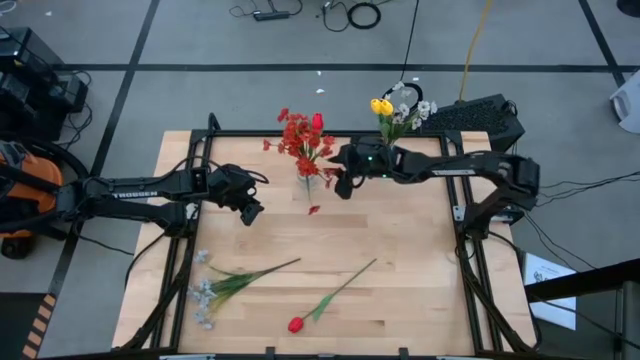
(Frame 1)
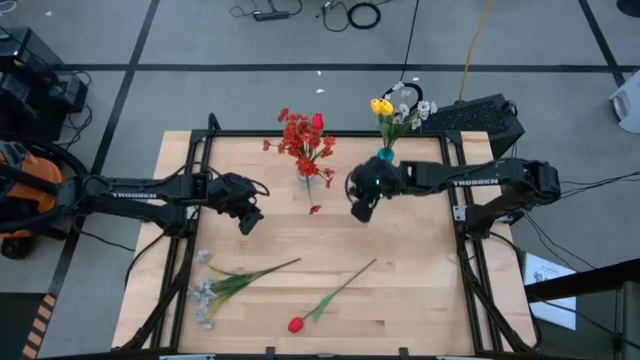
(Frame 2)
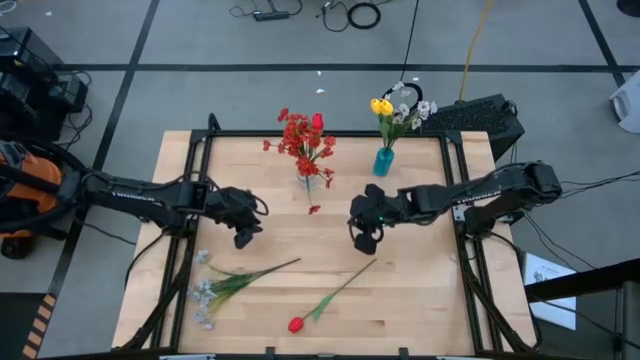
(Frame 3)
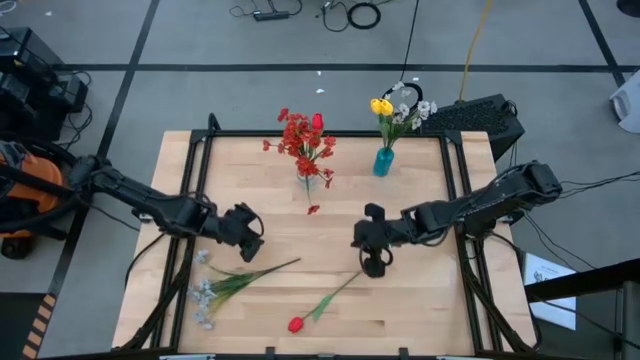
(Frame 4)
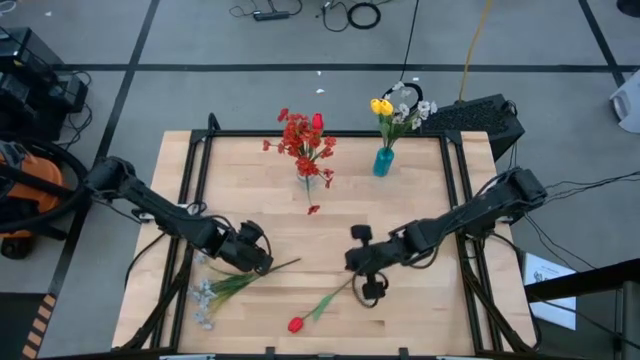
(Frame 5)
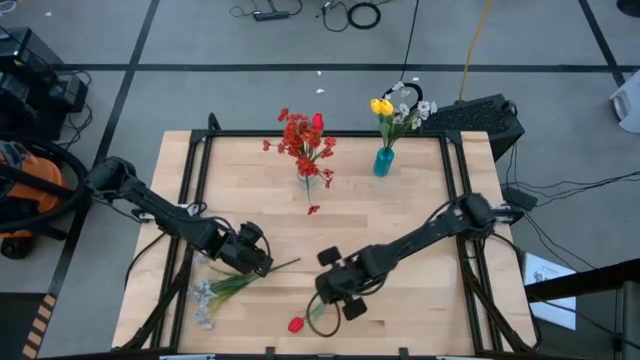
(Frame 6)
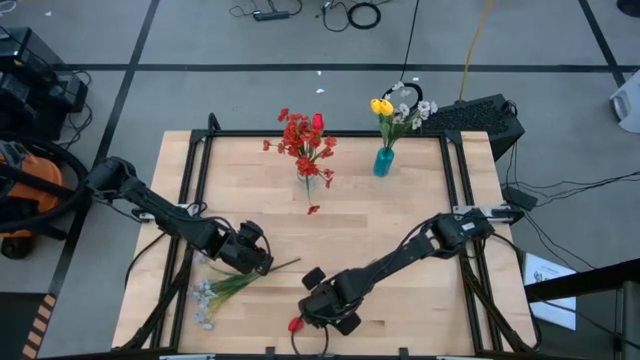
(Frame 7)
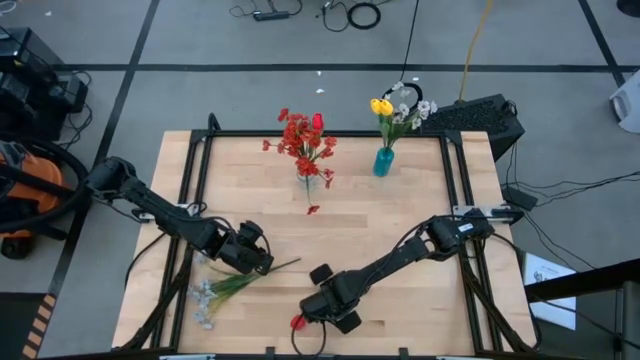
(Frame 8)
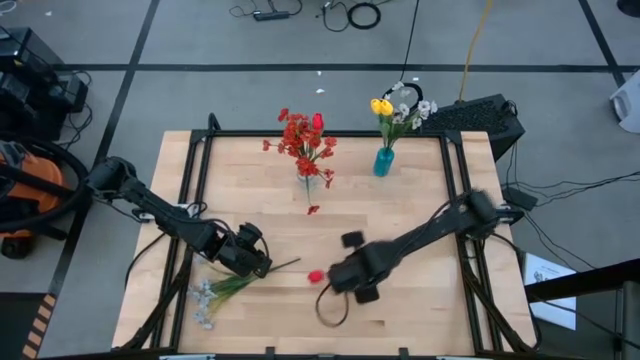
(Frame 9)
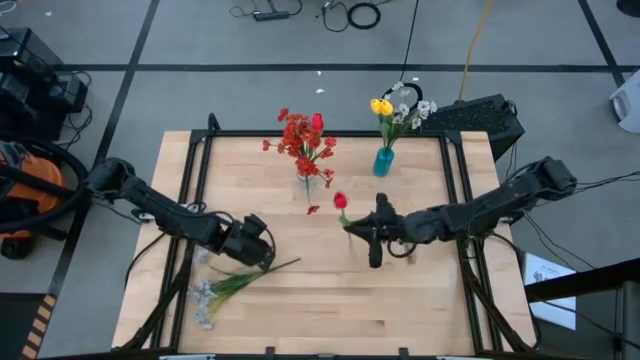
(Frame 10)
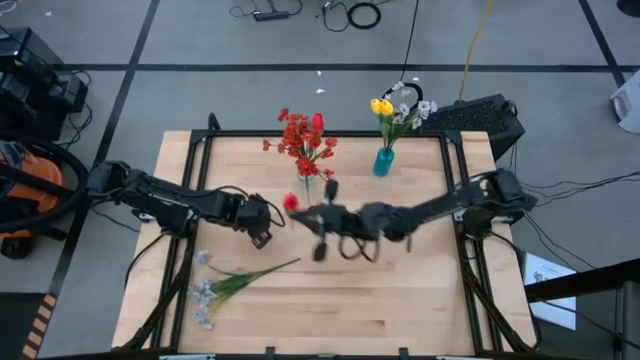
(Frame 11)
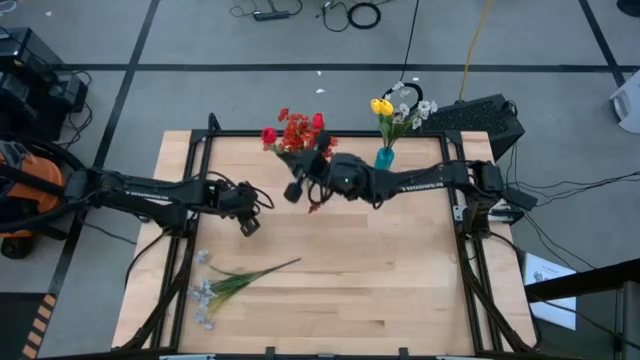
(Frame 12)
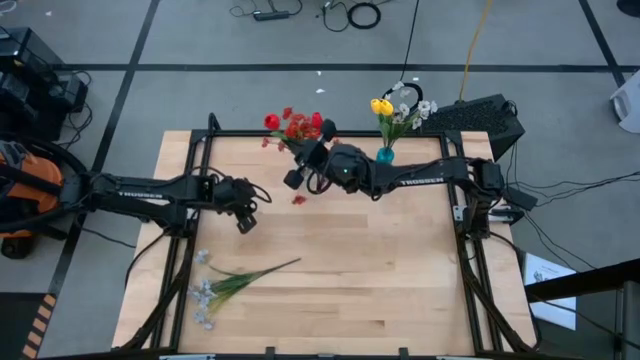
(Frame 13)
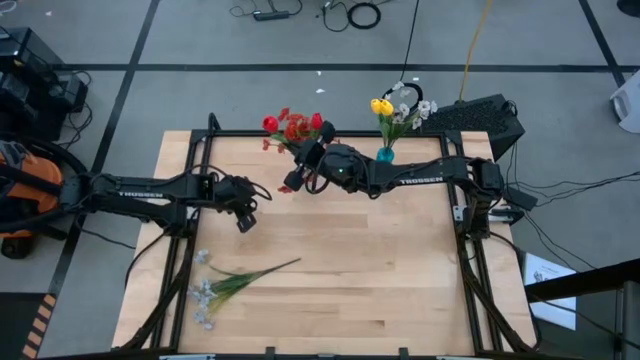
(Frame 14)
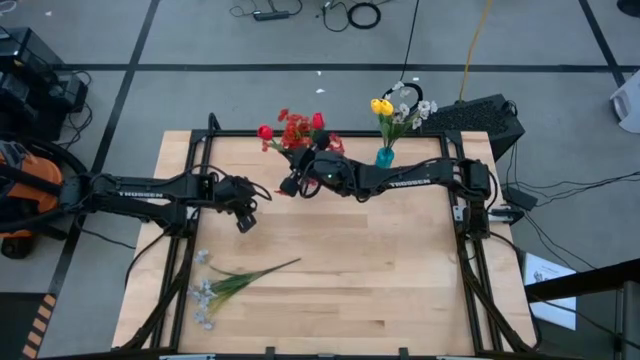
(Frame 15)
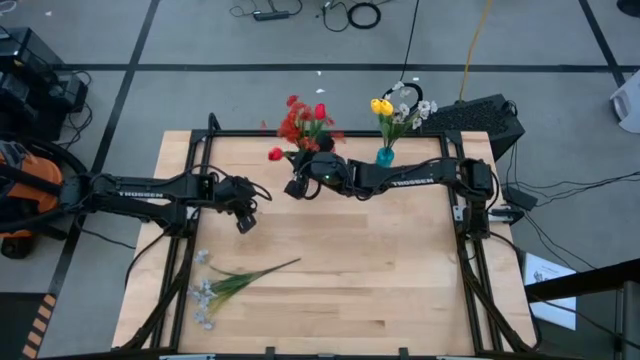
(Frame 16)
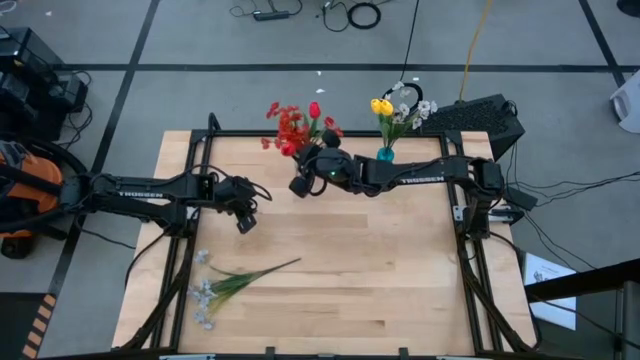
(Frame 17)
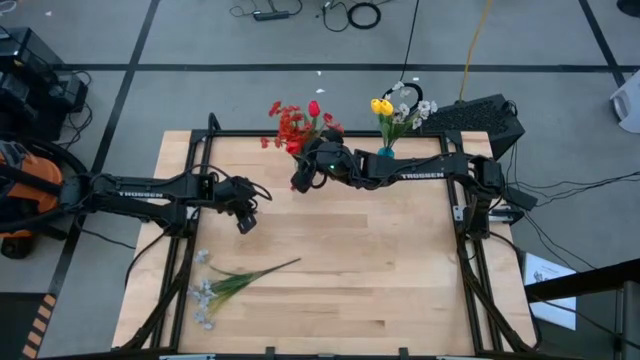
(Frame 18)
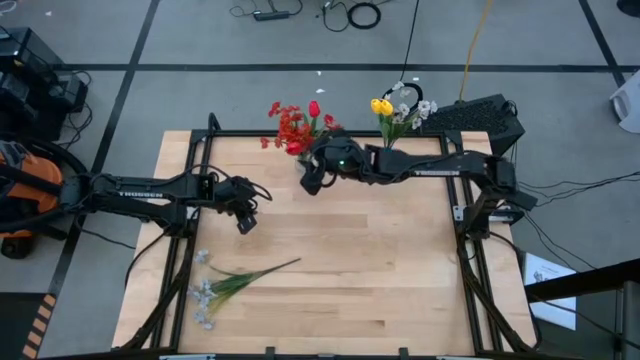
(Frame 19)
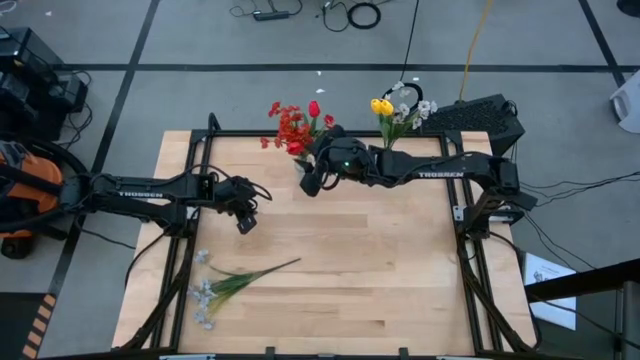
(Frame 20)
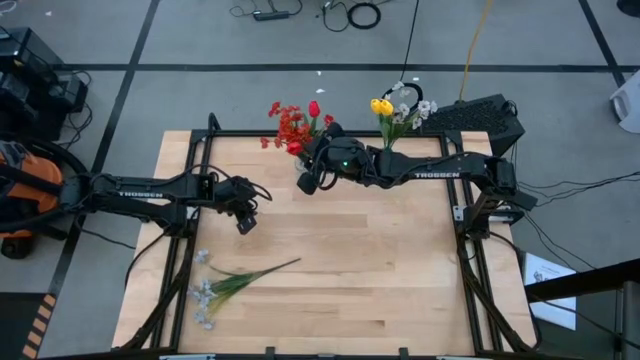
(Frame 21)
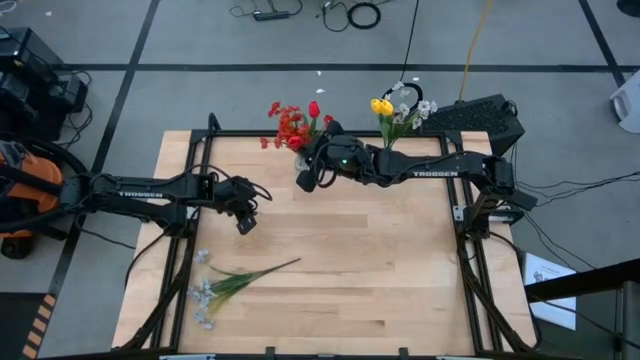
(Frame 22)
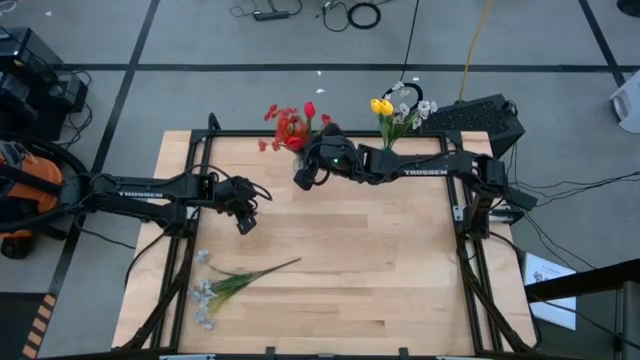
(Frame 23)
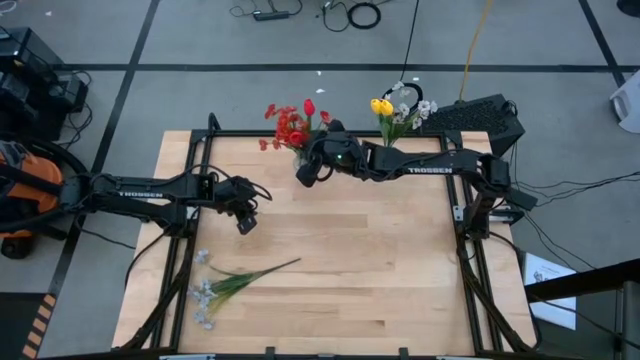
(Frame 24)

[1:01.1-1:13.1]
Task: Sort flowers into vase by color
Put the red tulip into the transparent vase

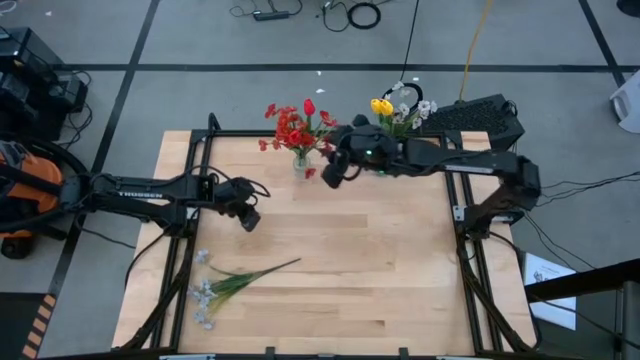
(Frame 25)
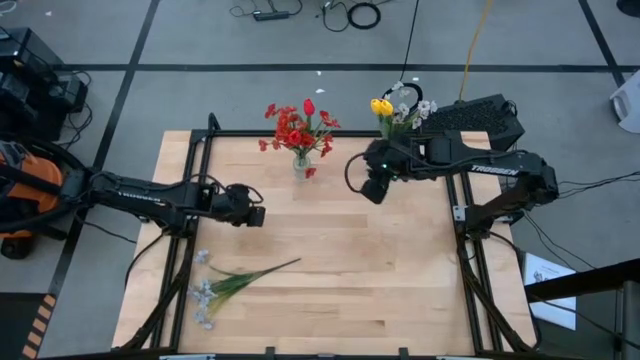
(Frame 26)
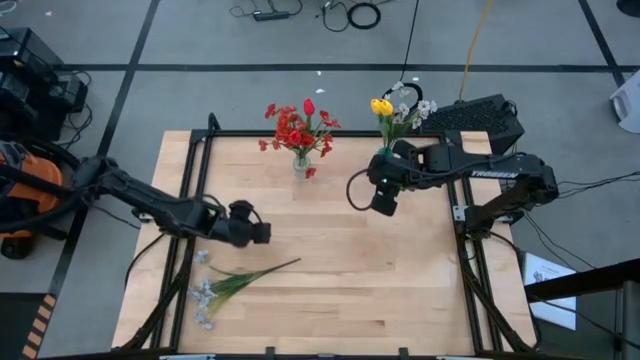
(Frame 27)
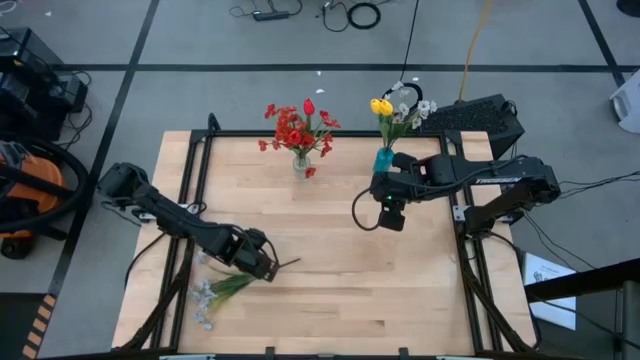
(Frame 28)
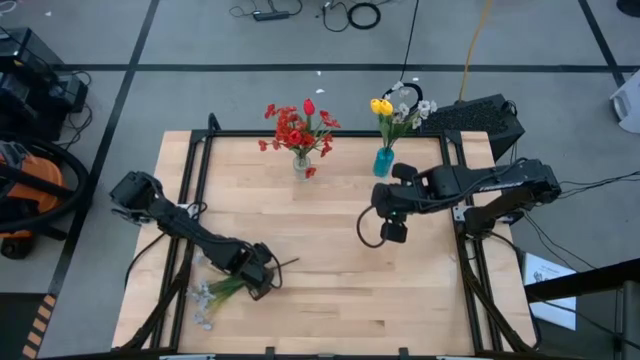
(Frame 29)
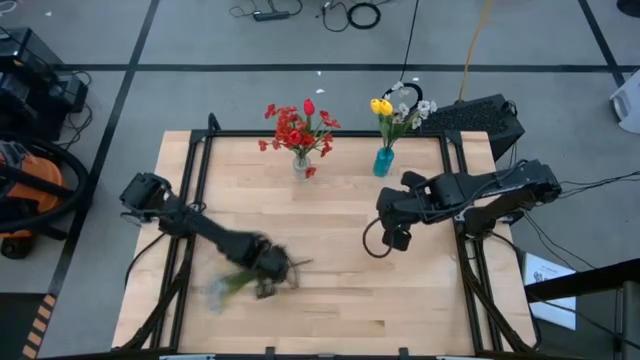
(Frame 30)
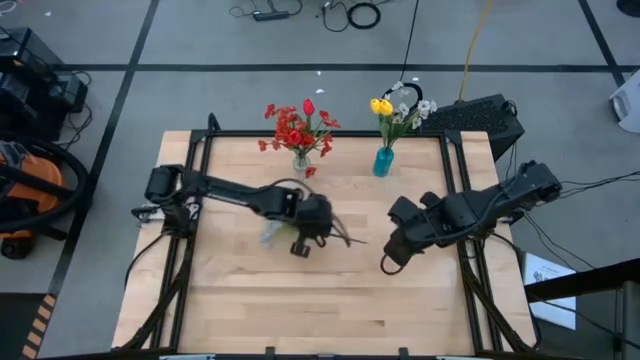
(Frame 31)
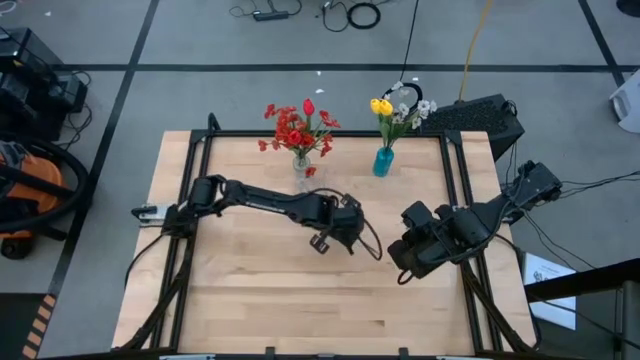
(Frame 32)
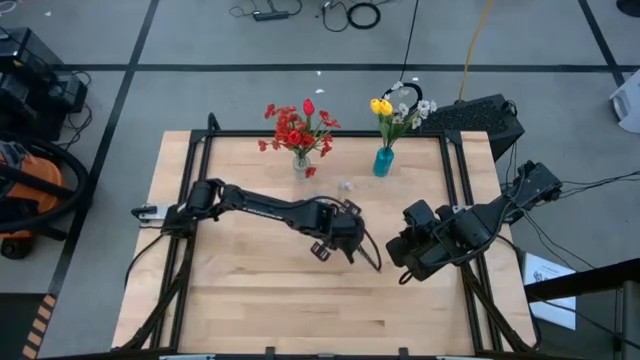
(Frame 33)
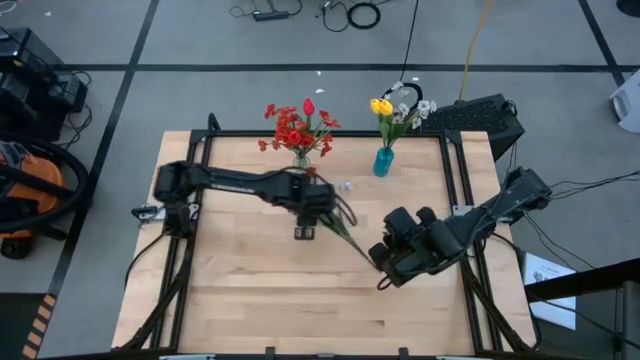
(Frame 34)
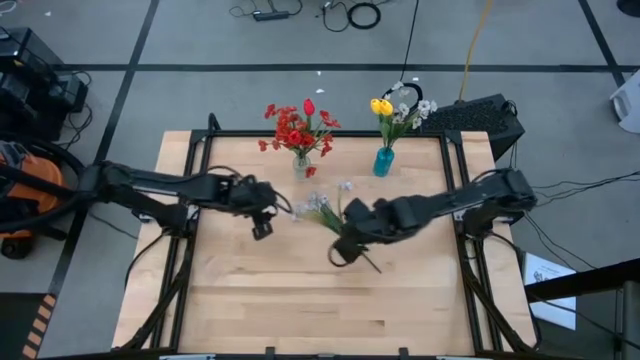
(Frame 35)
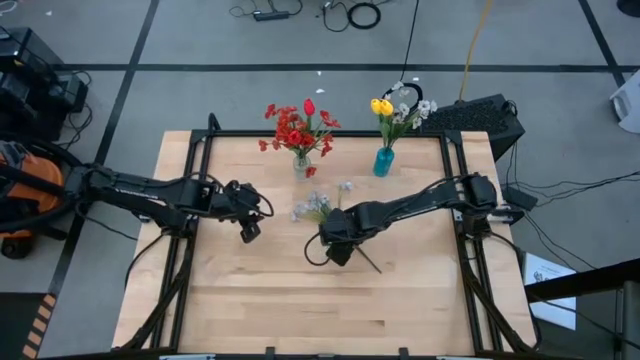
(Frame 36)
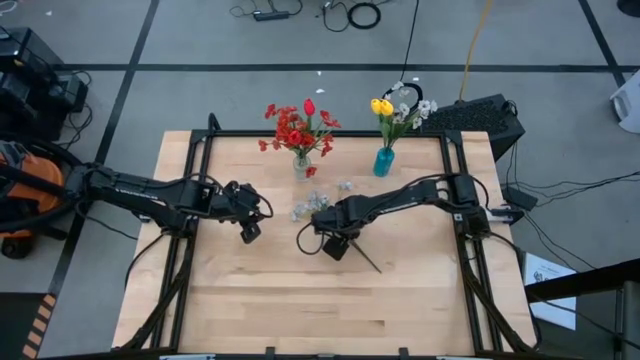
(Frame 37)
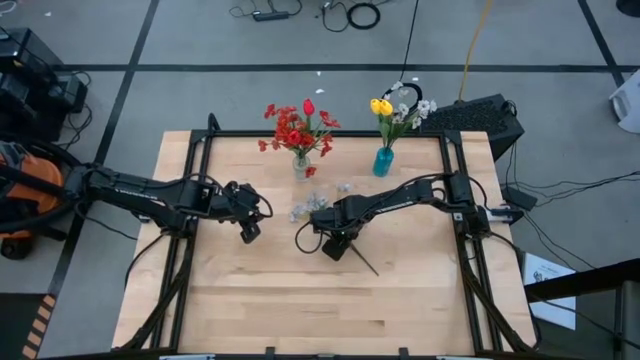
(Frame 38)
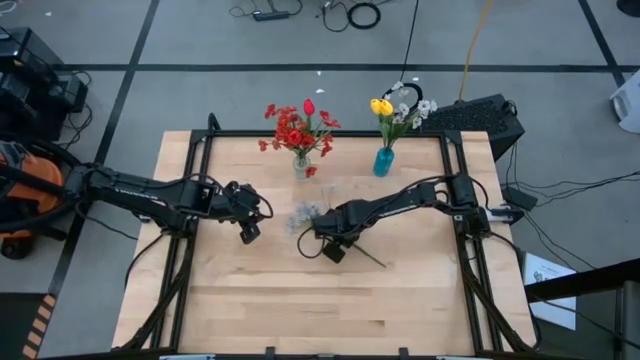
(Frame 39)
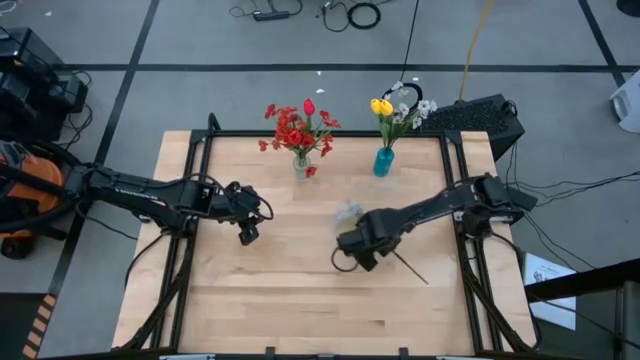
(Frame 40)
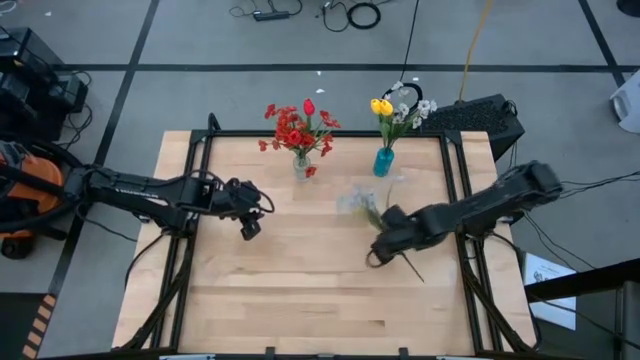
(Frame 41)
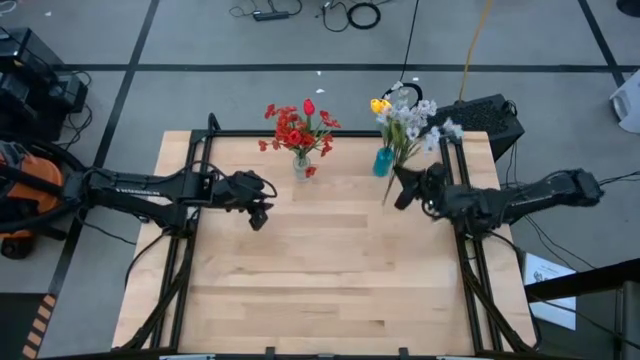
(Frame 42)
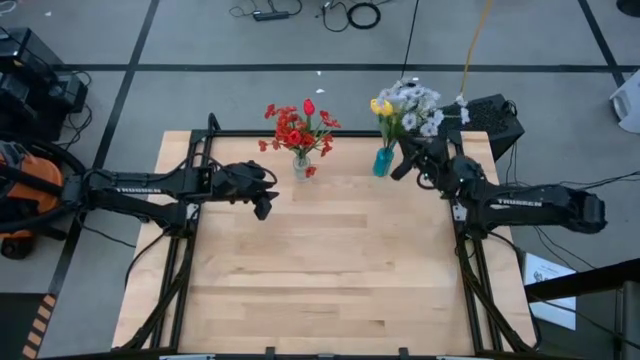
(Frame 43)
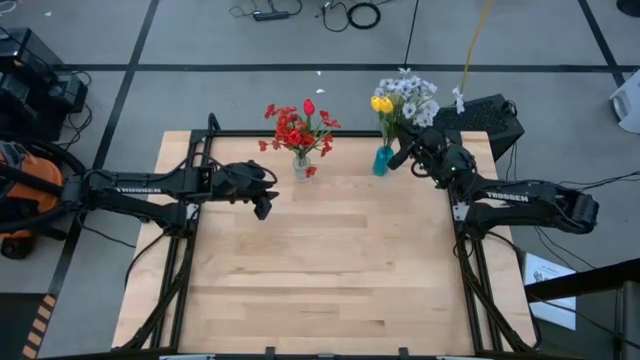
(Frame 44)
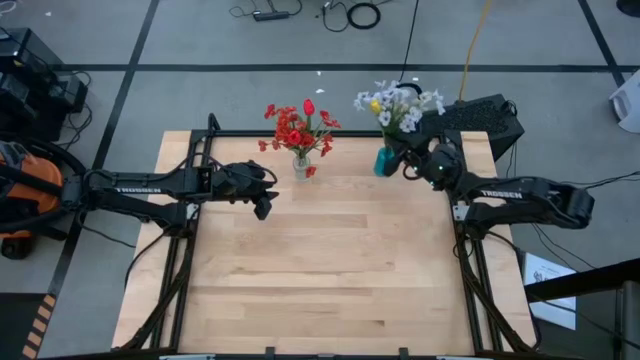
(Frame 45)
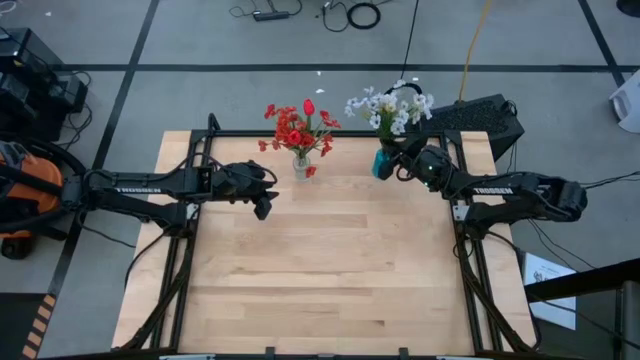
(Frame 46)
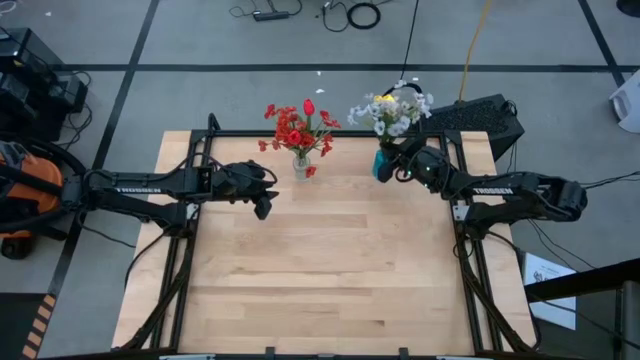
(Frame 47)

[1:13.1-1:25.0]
Put the white flower into the blue vase
